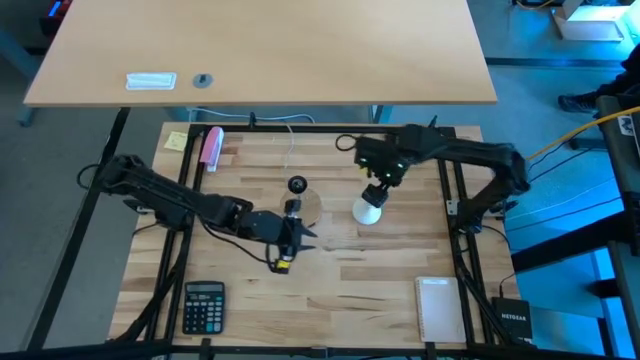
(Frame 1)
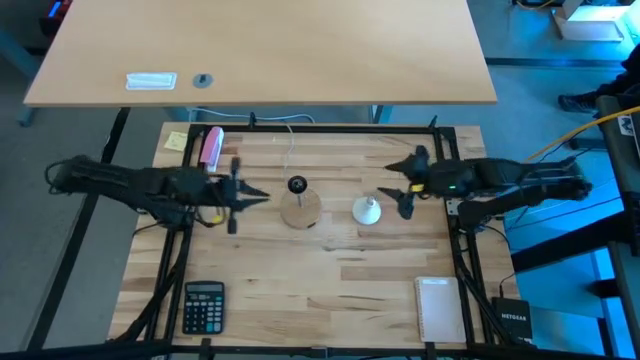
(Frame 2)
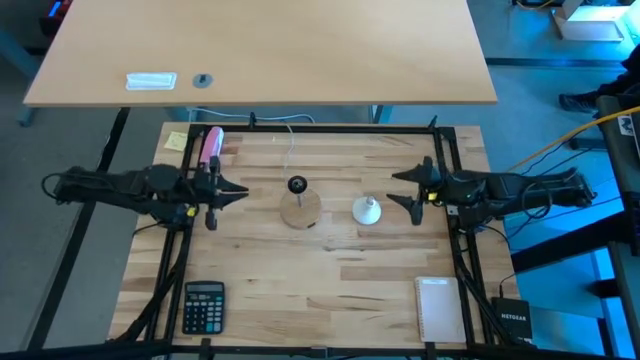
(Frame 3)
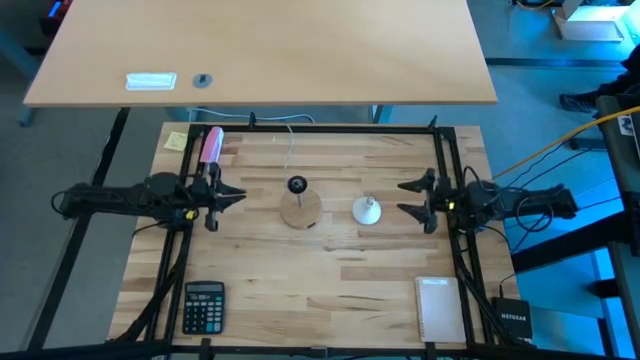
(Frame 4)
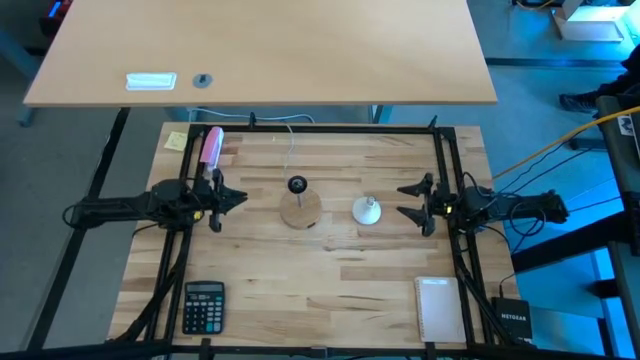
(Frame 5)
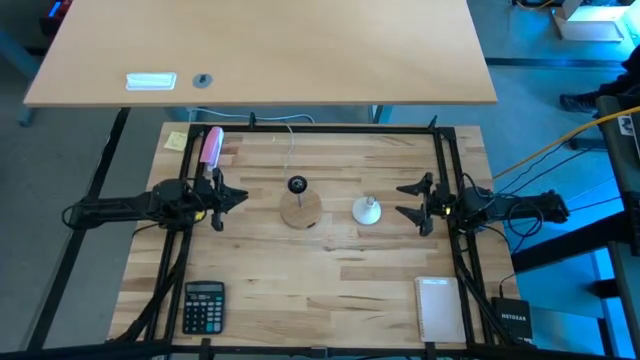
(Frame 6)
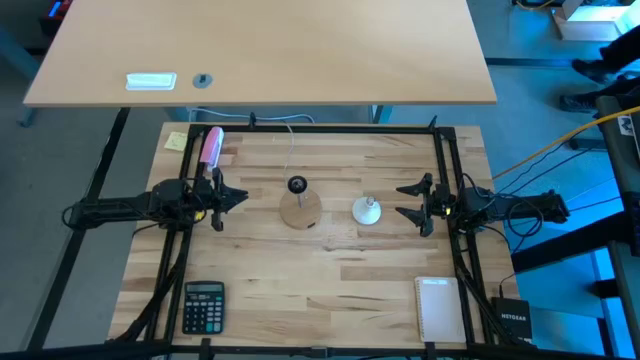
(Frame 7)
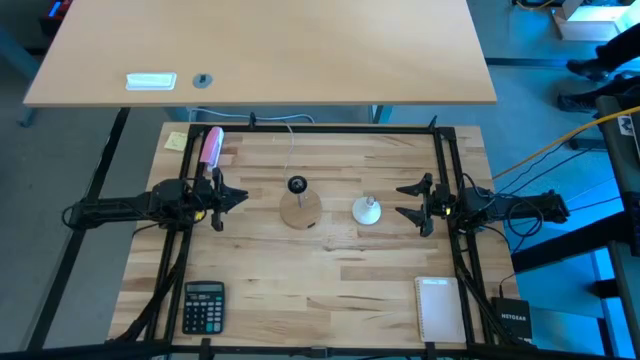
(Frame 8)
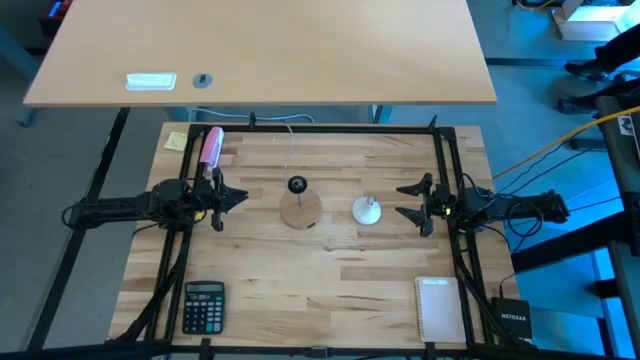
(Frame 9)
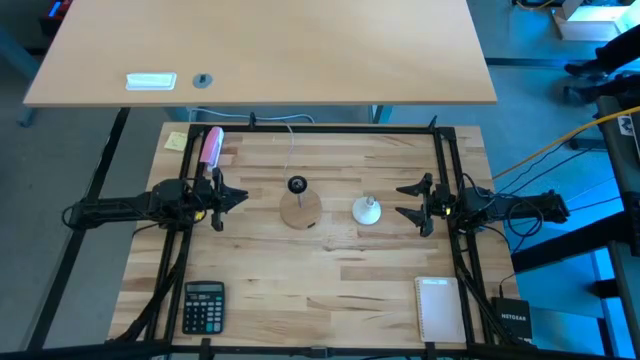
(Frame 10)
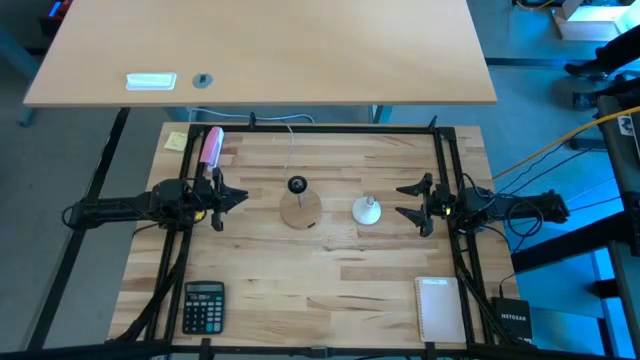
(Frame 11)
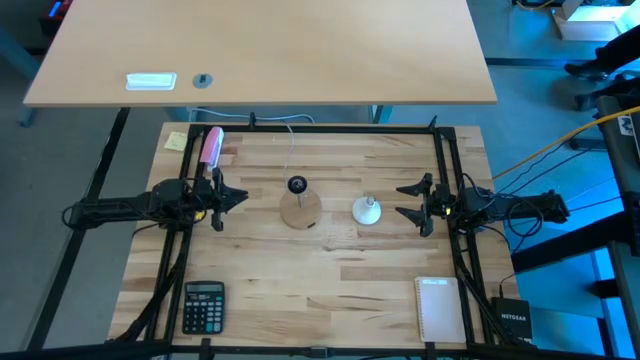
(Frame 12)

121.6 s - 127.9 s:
Task: Screw lightbulb
Return to Home Position
